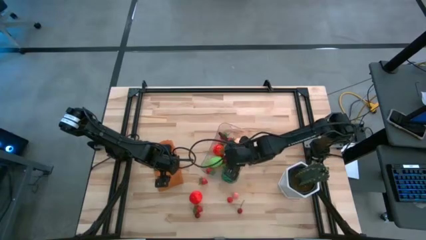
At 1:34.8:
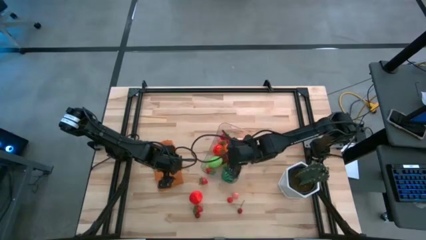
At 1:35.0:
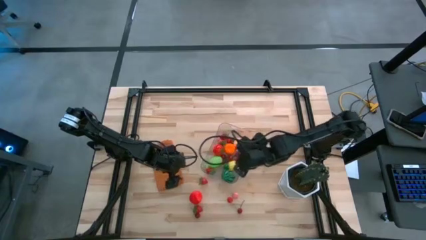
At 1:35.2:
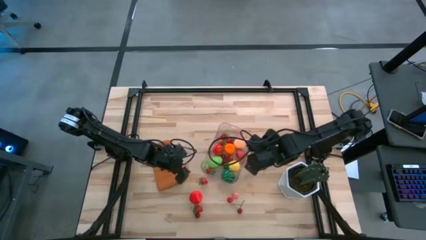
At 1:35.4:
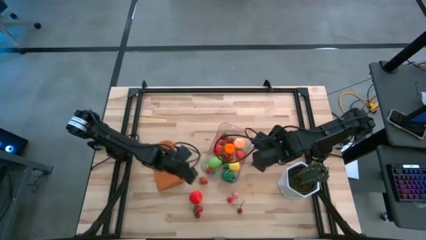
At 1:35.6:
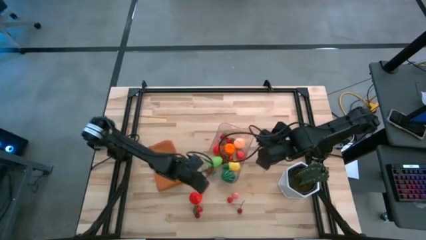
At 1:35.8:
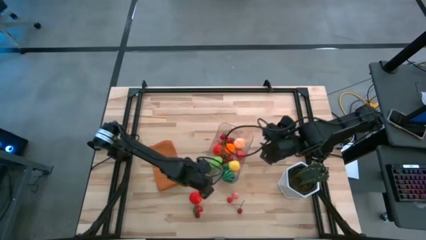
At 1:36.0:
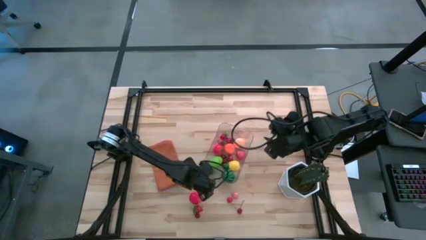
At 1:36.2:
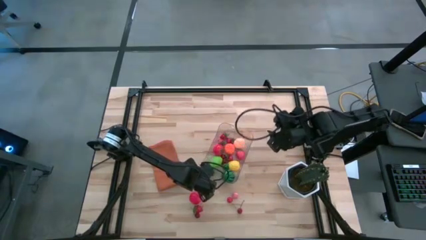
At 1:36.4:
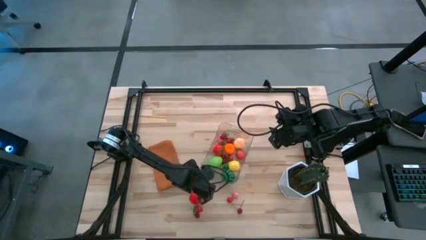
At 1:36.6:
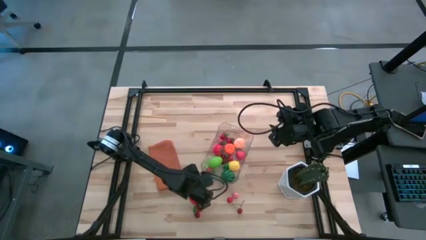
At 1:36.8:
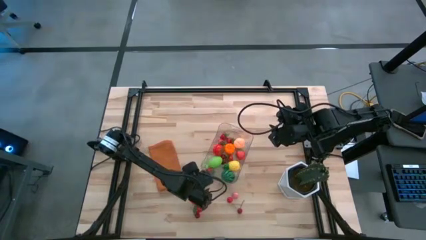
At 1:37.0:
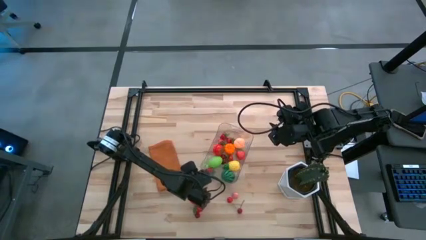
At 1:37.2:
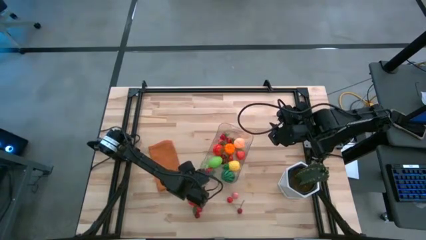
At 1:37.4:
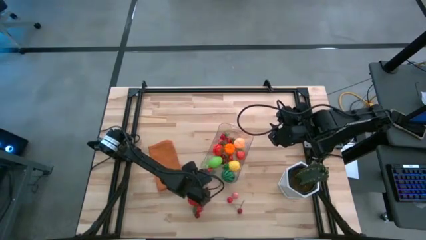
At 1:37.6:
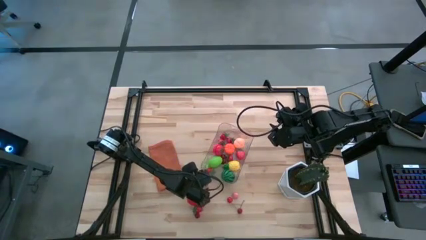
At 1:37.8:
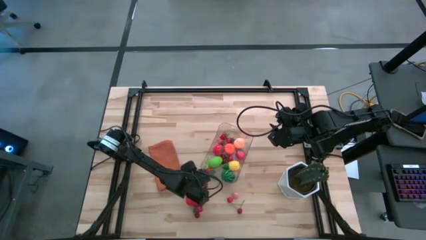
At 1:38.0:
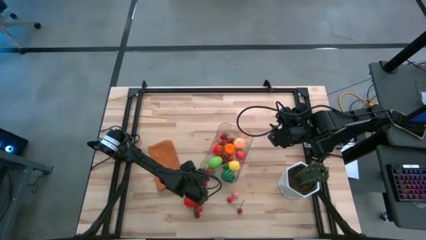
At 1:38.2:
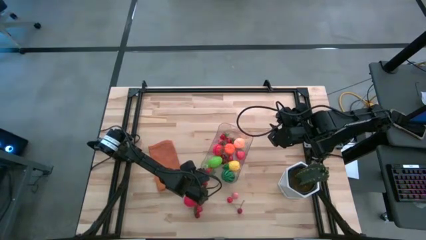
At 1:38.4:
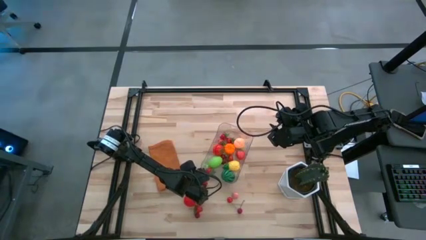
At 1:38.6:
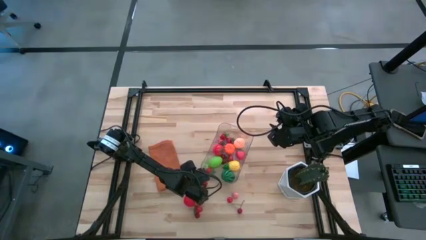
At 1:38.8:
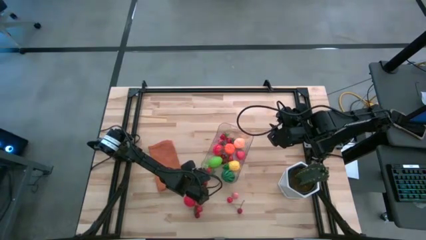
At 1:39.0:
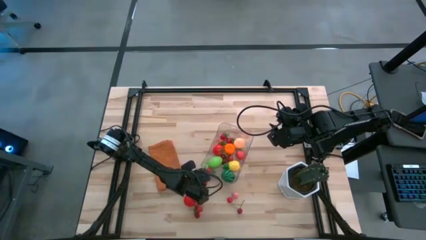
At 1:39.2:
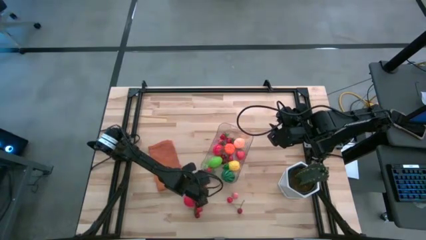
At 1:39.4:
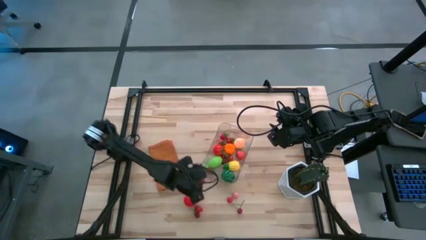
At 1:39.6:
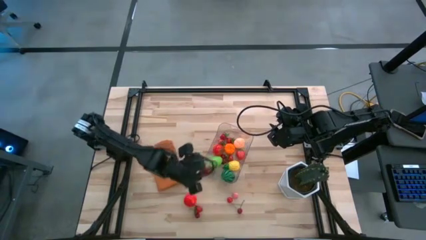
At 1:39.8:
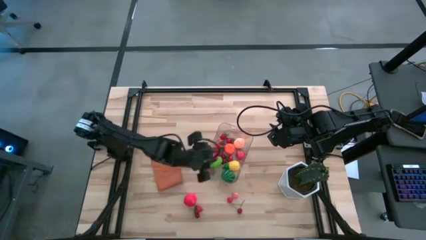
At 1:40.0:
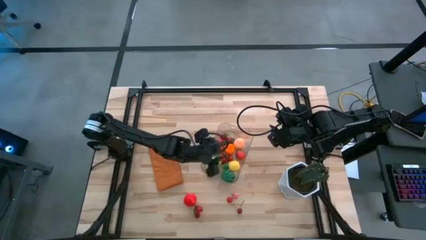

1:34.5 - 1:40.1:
Task: Pick and placing Produce into tupperware
Put the red strawberry into the transparent bin

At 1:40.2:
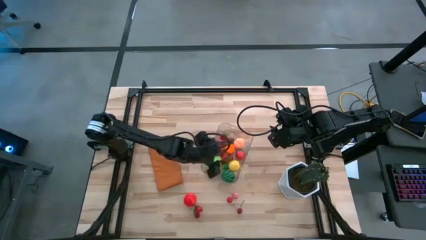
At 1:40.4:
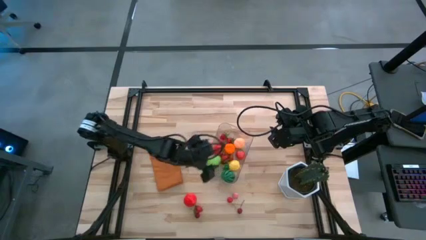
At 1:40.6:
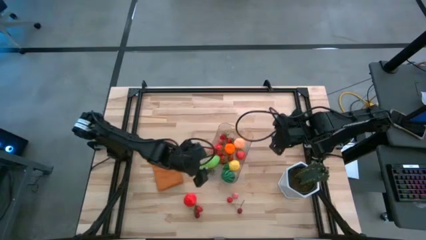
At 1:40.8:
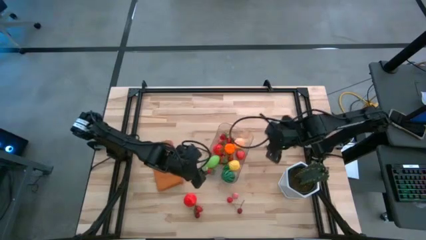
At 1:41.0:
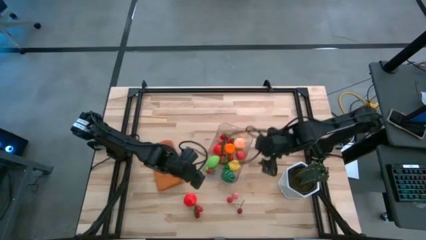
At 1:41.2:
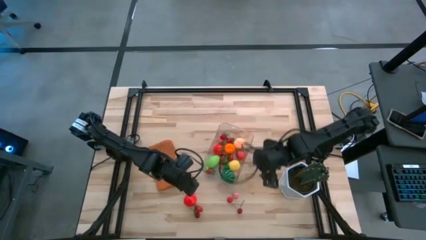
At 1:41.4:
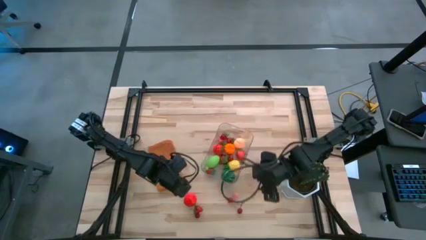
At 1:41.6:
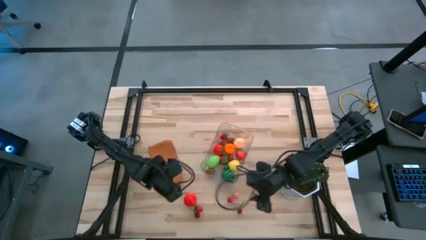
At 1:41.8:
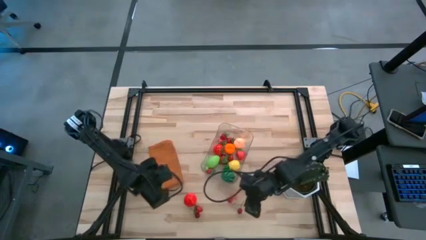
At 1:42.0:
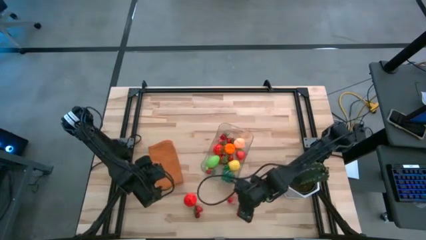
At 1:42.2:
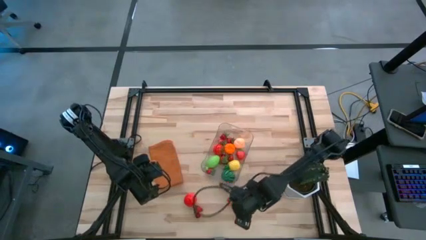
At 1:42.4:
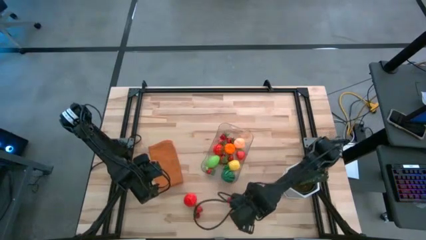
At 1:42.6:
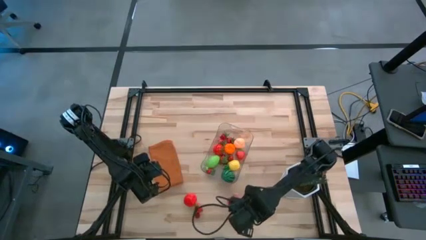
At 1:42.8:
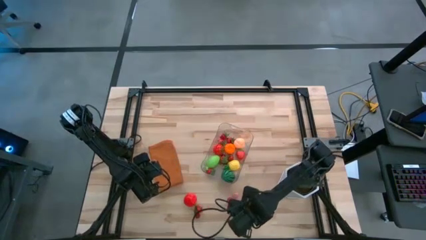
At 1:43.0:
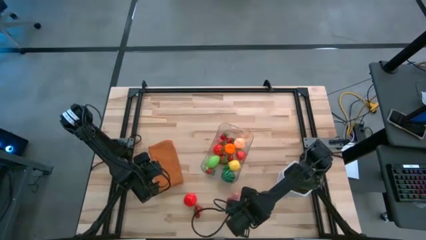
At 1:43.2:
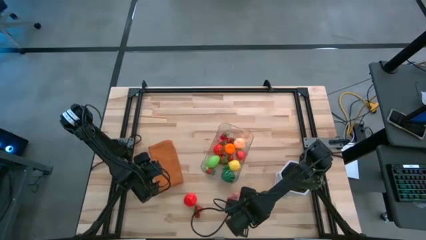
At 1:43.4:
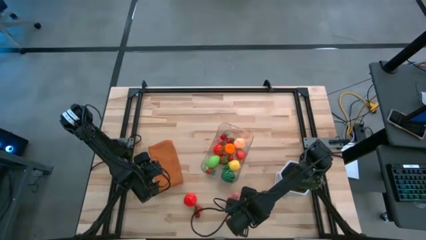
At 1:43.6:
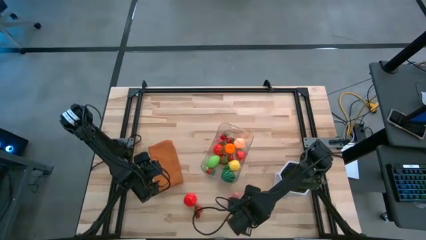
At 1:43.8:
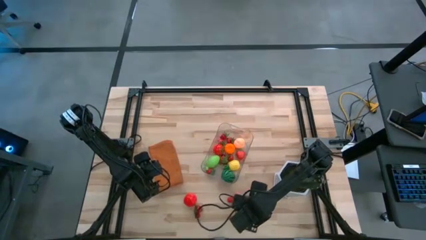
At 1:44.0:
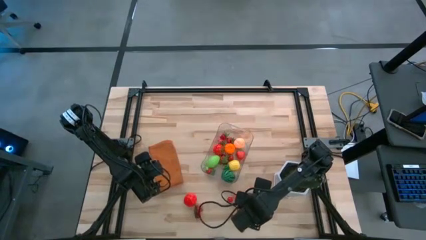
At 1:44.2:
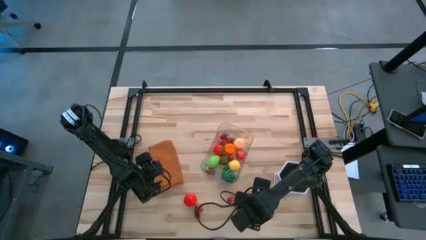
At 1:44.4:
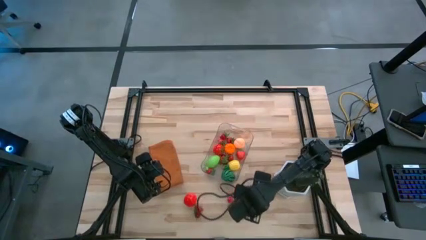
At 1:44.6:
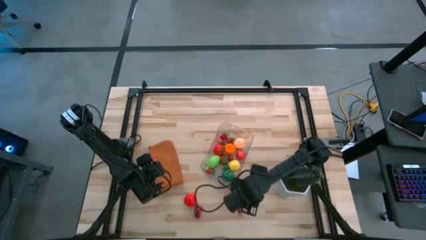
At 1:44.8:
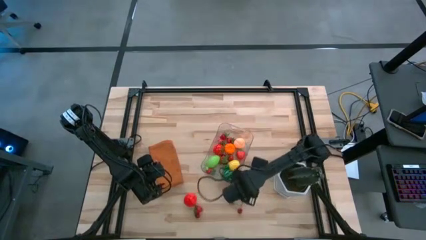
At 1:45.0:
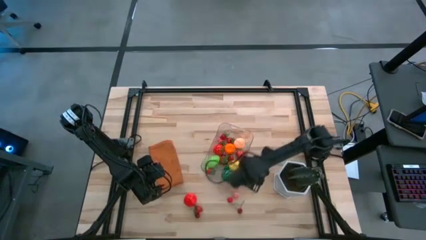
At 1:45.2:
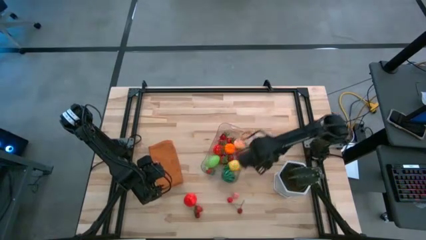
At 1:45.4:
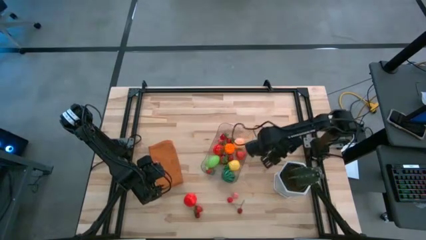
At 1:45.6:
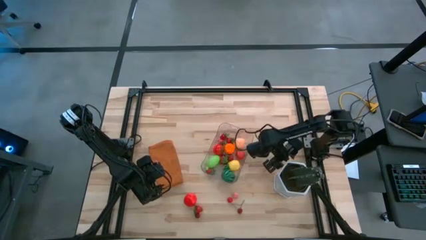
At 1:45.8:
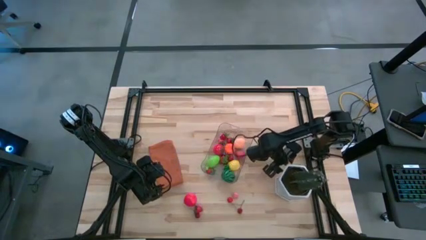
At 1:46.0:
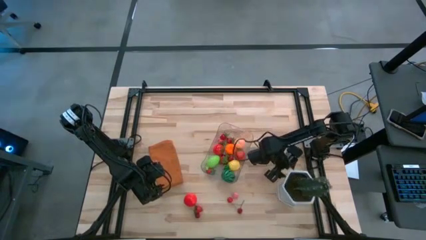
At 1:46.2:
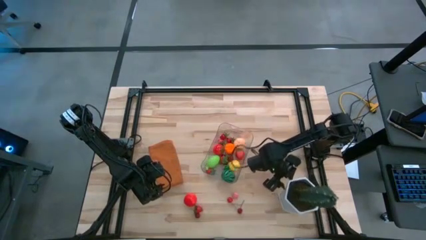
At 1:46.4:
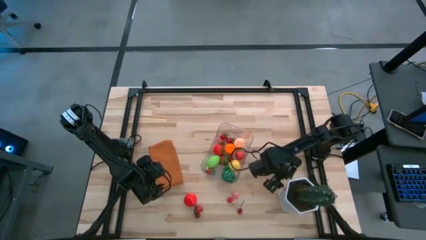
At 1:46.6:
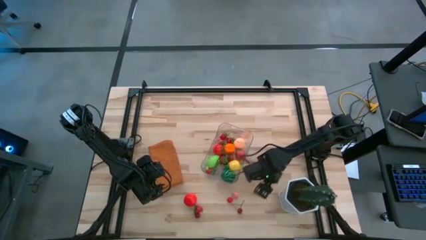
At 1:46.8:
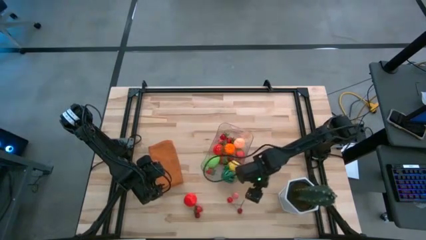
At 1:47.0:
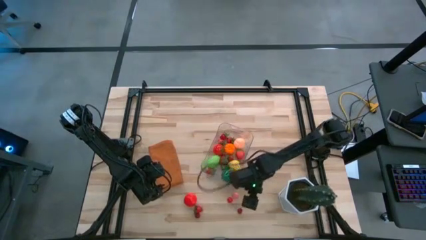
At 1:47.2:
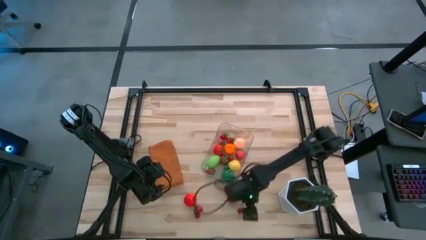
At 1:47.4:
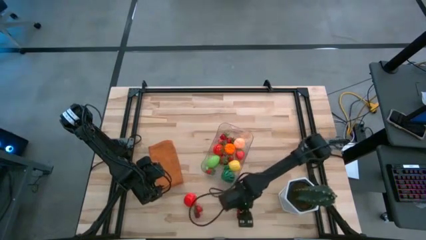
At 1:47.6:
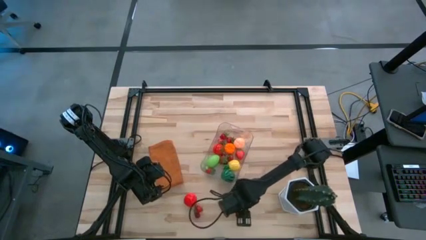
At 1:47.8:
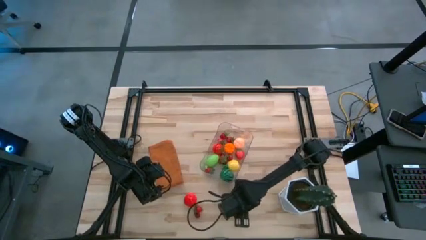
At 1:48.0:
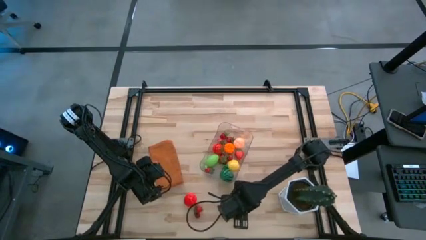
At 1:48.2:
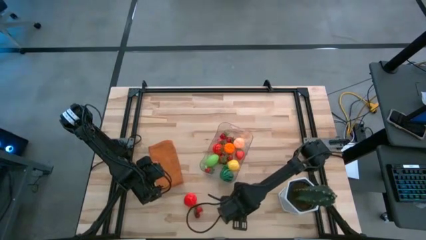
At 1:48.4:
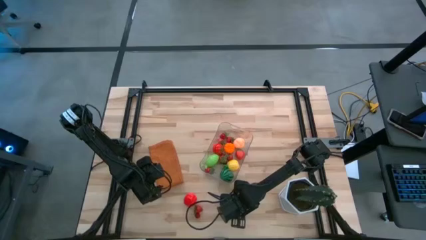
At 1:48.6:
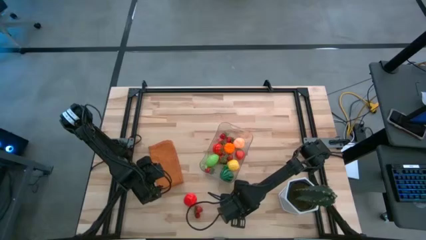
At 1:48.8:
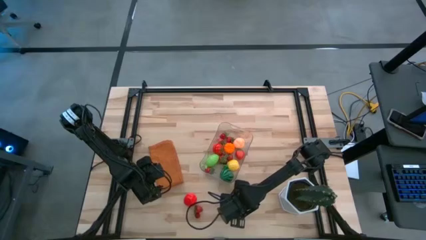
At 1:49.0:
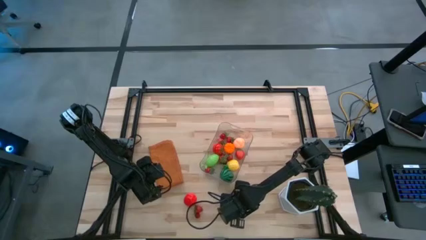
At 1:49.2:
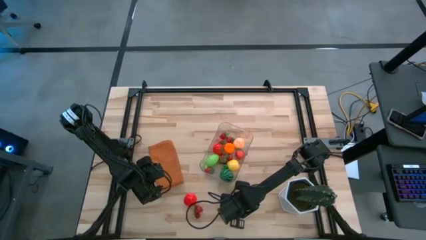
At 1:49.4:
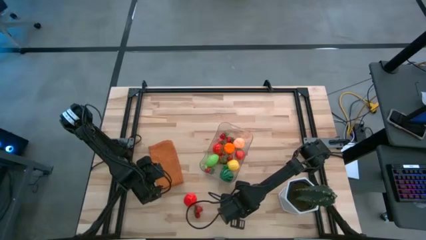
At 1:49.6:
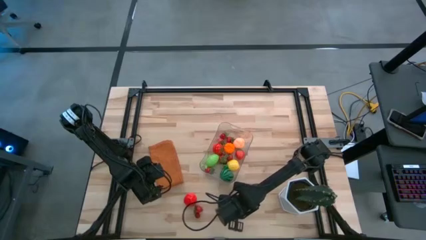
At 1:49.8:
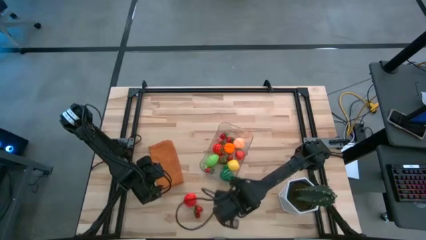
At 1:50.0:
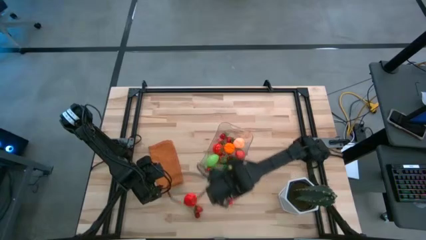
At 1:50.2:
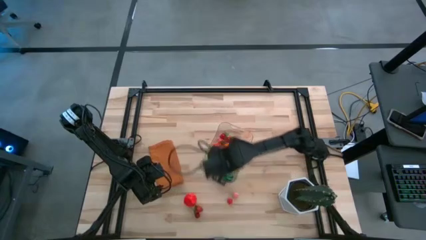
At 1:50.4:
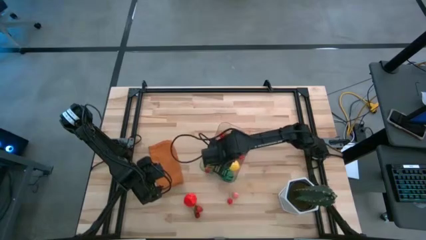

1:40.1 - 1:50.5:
Put the red cherry into the transparent bin

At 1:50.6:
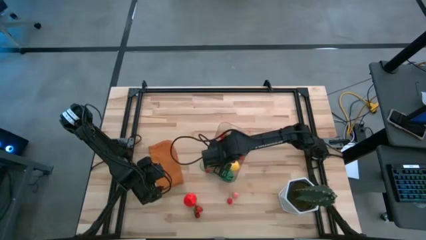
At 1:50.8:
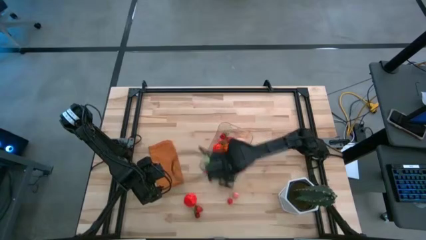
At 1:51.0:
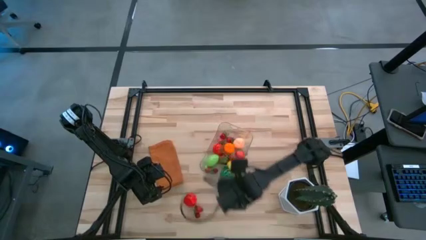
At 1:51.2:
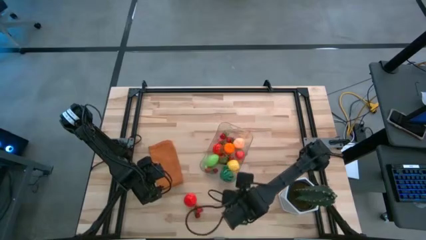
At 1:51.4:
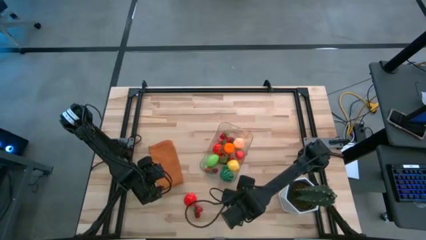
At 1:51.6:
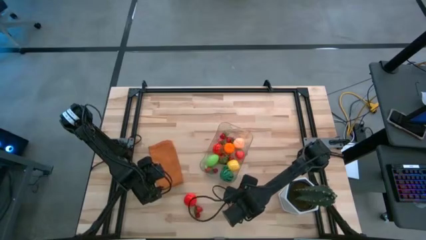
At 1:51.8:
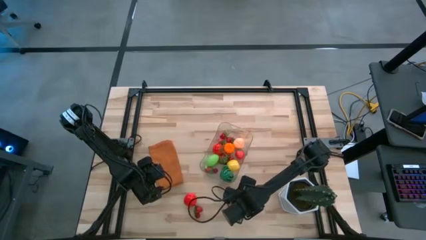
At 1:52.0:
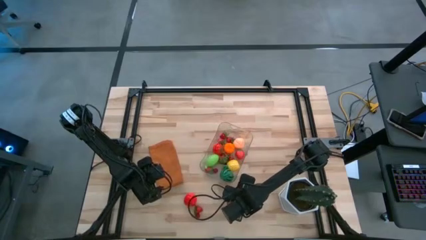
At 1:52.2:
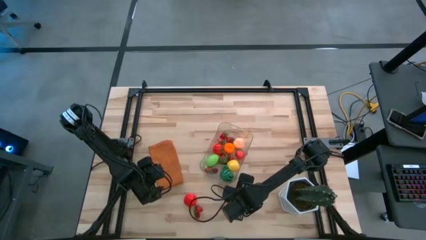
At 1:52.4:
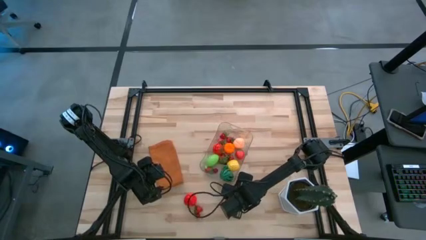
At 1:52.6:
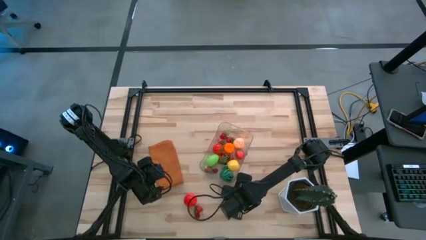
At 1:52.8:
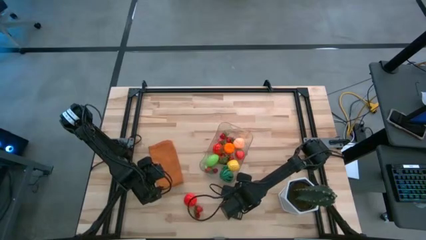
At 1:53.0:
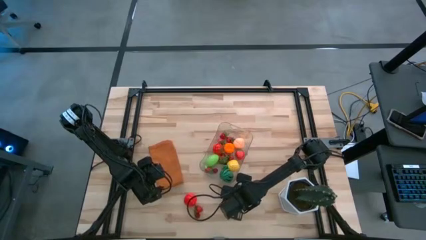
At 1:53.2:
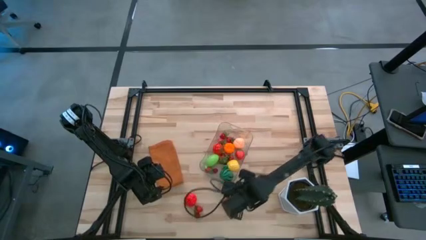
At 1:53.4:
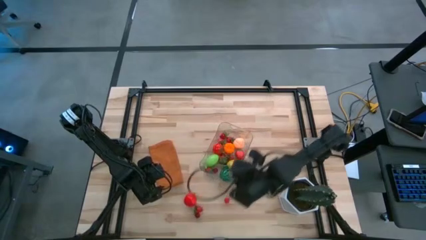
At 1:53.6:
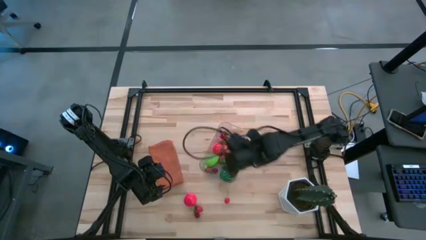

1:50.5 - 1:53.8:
Put the pink peach into the transparent bin
